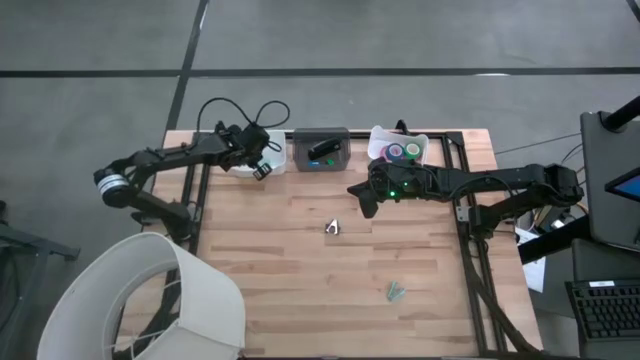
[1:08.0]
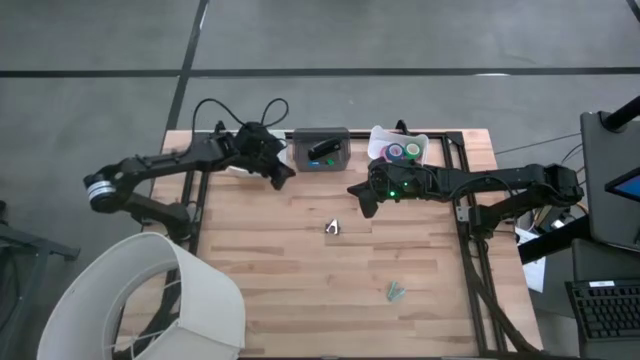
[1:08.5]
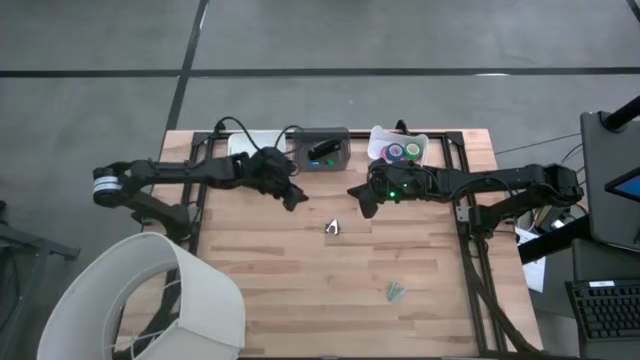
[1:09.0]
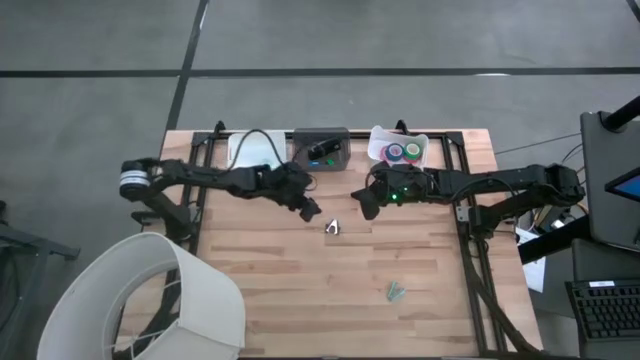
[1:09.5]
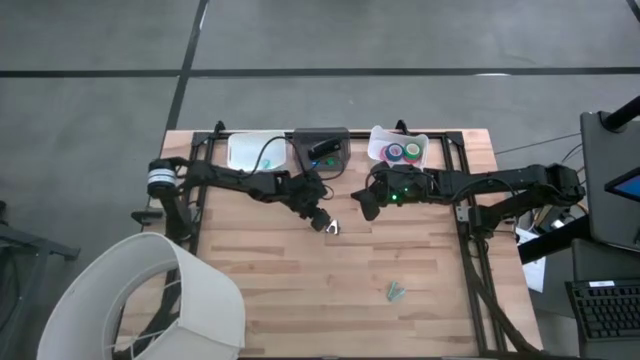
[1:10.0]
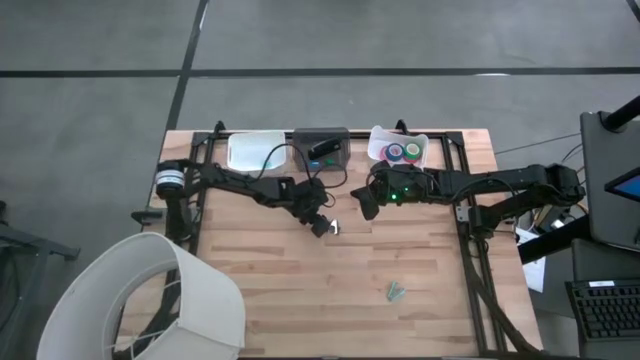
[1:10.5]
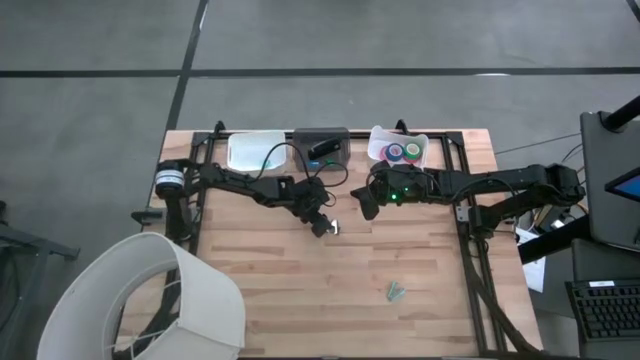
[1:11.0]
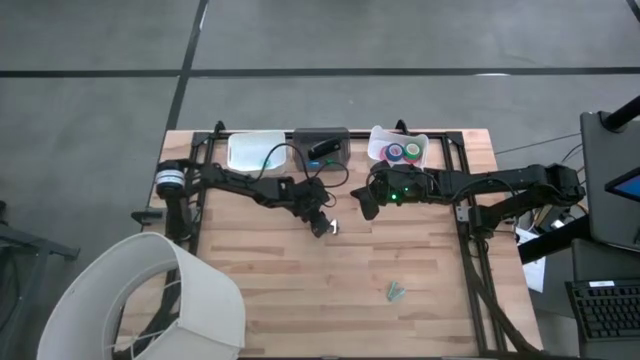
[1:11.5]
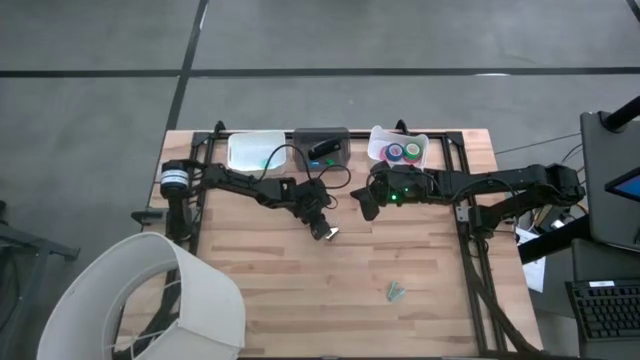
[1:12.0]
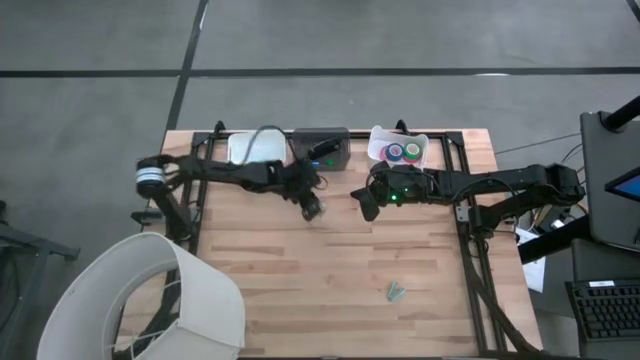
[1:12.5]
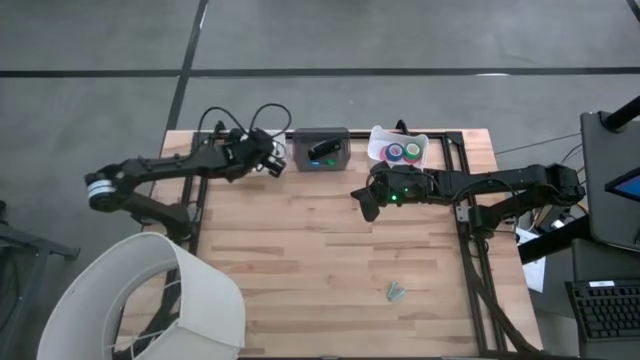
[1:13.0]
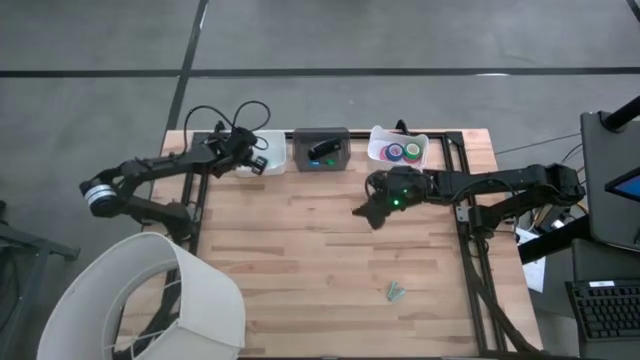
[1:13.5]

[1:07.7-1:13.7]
Task: Pick and place Stapler, Stapler remover, tape
Put the gray staple remover into the left white bin

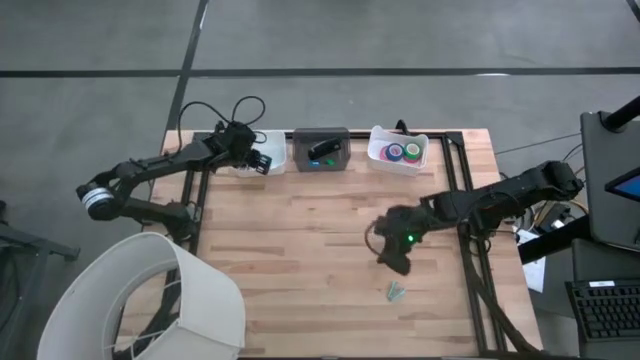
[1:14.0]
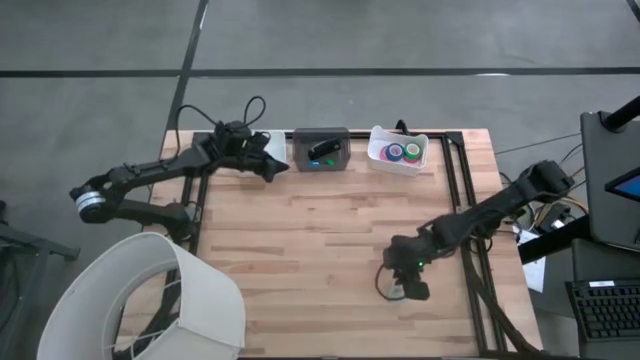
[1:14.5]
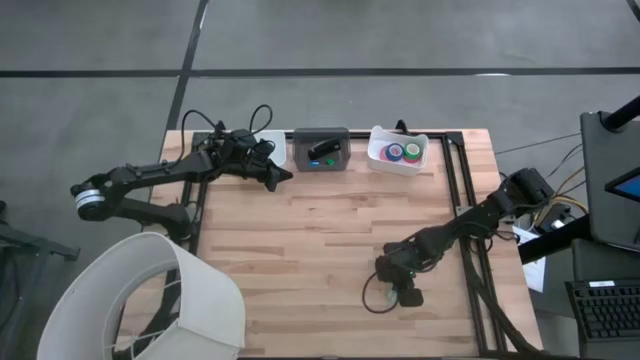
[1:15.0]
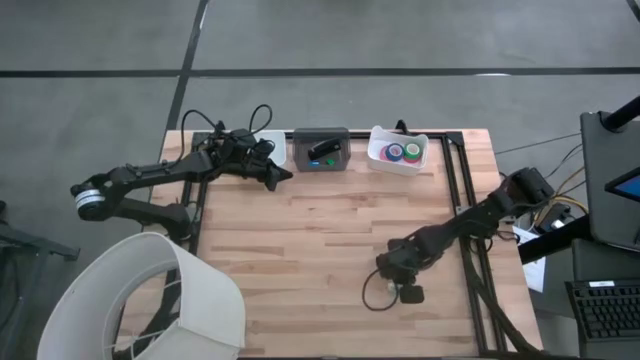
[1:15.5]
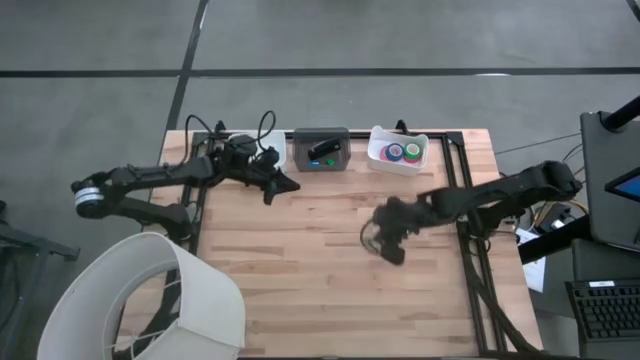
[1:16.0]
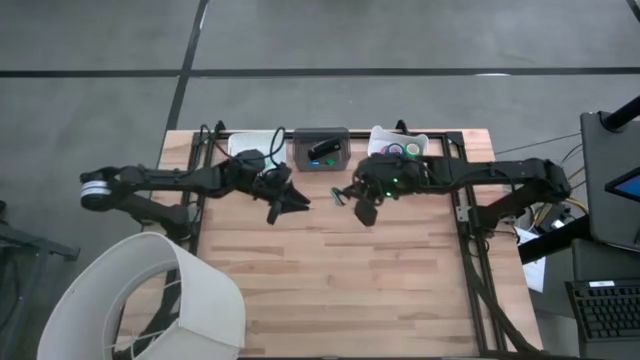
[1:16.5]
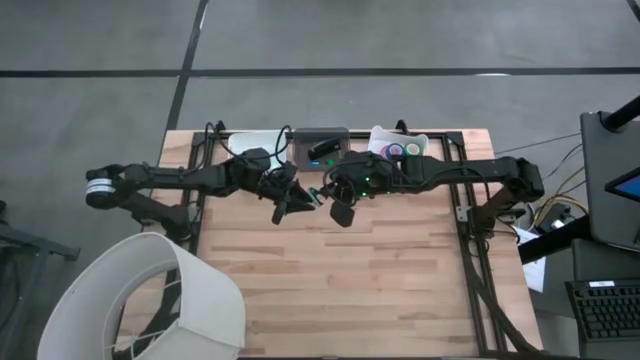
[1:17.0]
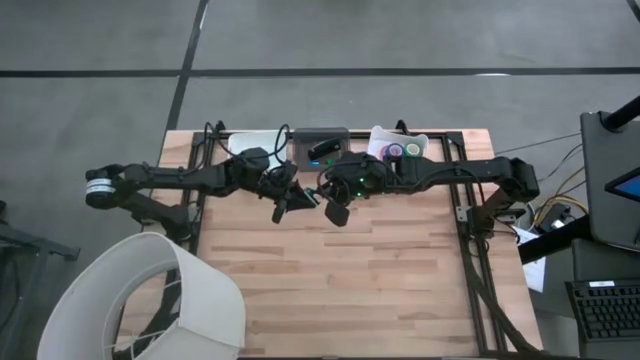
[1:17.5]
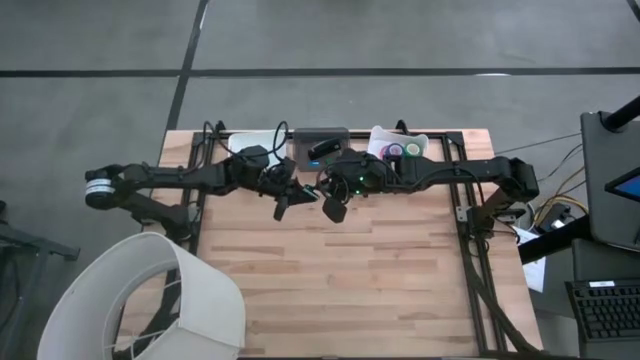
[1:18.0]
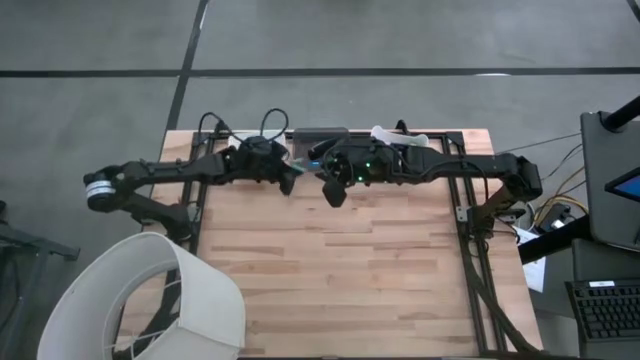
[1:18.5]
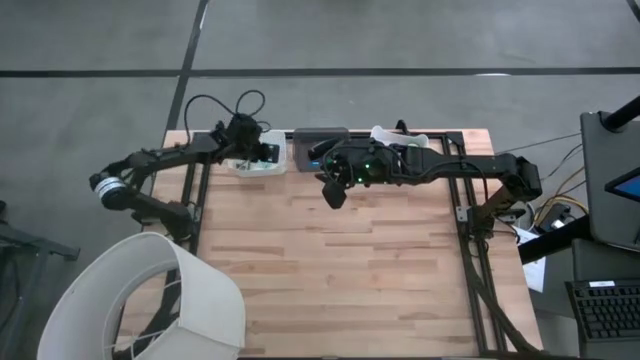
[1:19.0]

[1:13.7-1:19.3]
Put the light blue staple remover into the left white bin

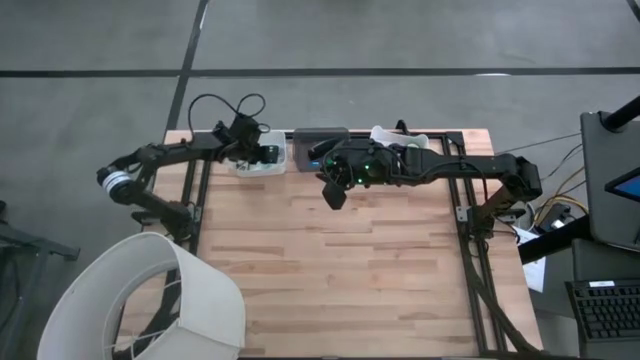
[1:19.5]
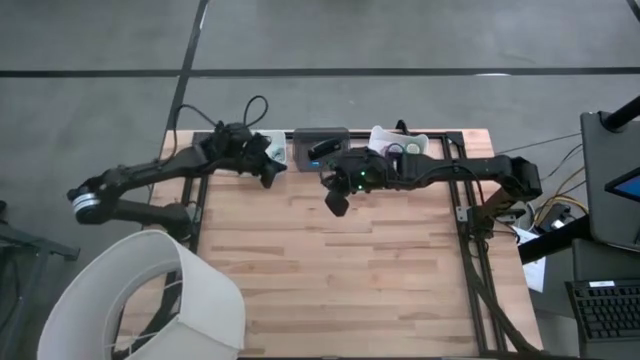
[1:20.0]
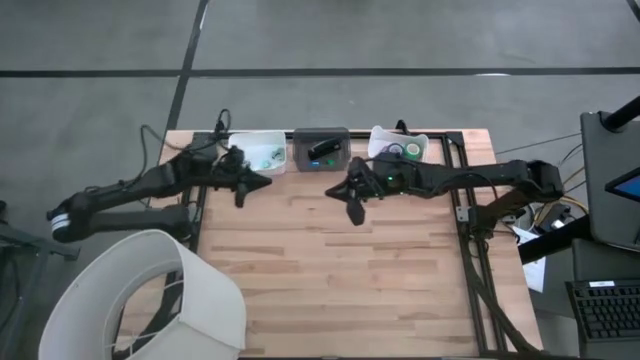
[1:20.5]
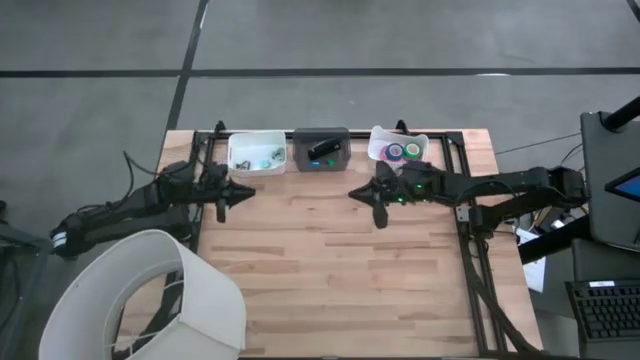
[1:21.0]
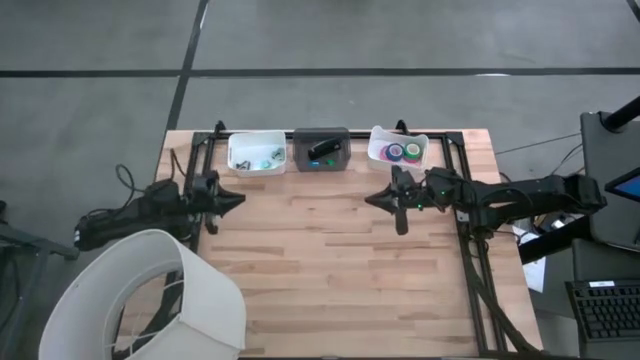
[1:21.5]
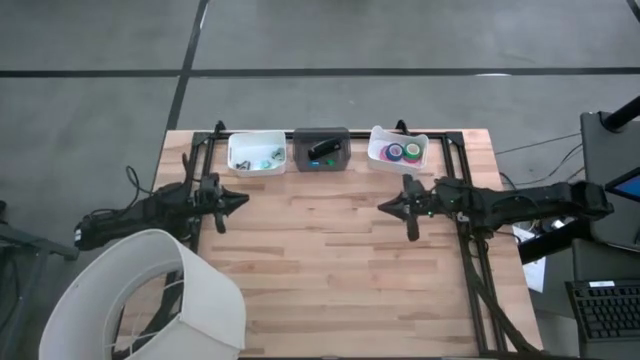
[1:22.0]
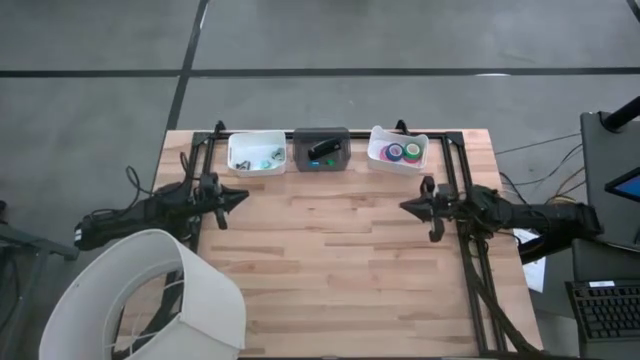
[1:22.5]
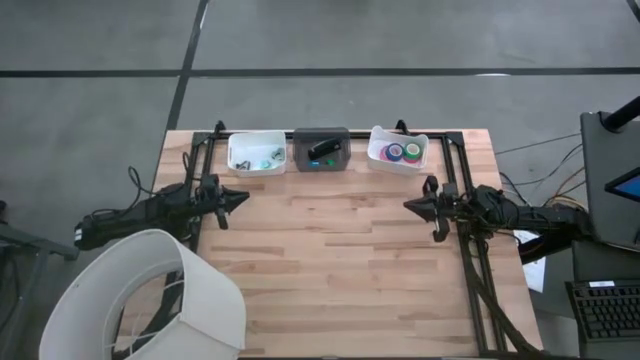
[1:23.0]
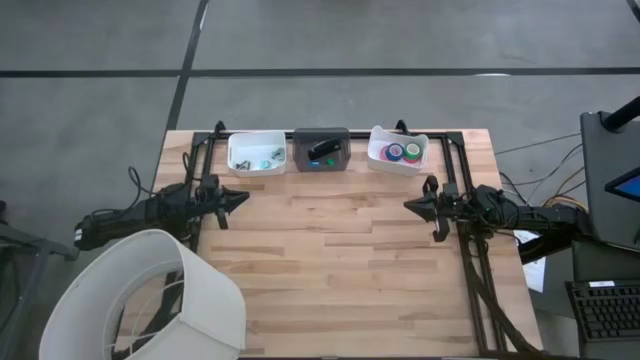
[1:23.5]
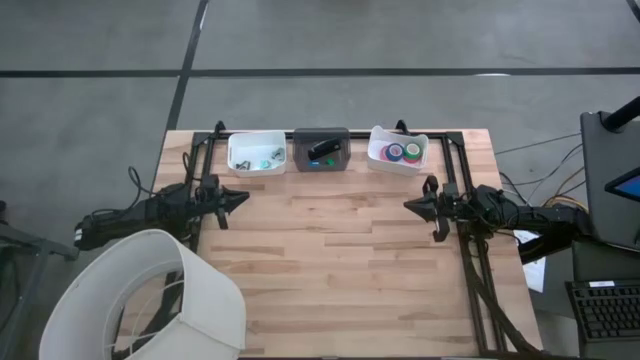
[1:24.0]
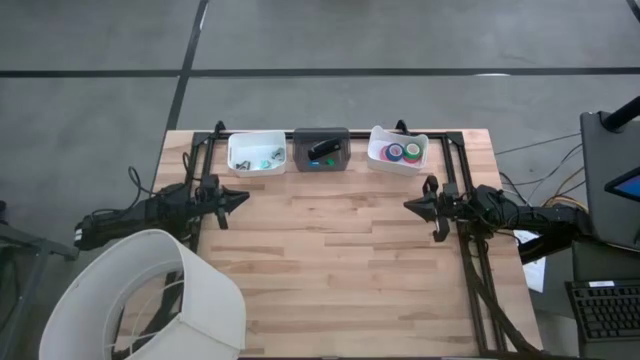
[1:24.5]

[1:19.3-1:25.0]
Return to Home Position

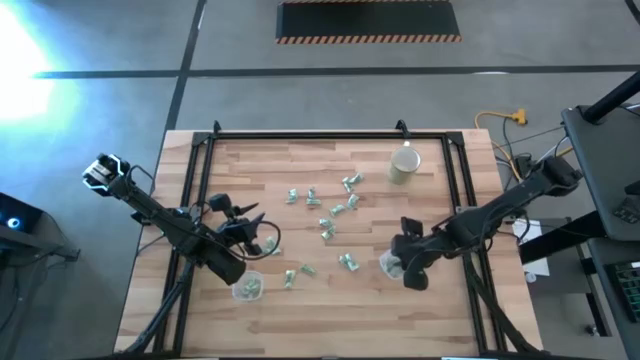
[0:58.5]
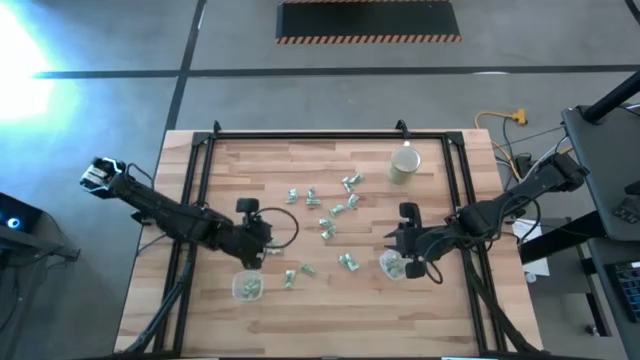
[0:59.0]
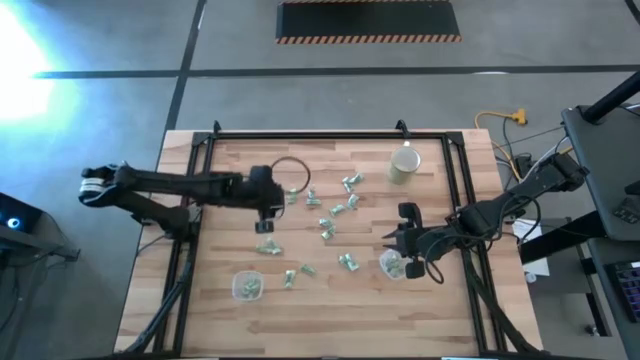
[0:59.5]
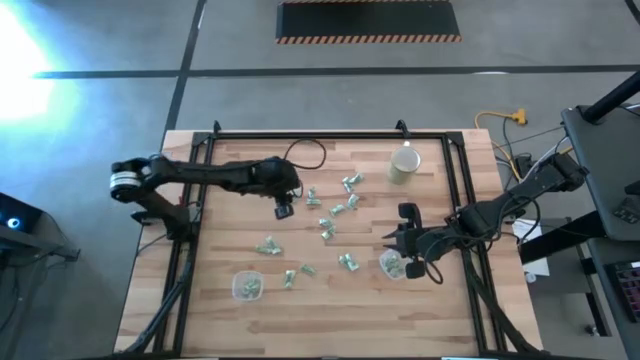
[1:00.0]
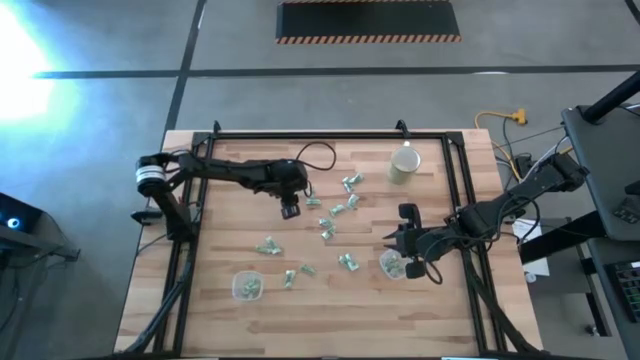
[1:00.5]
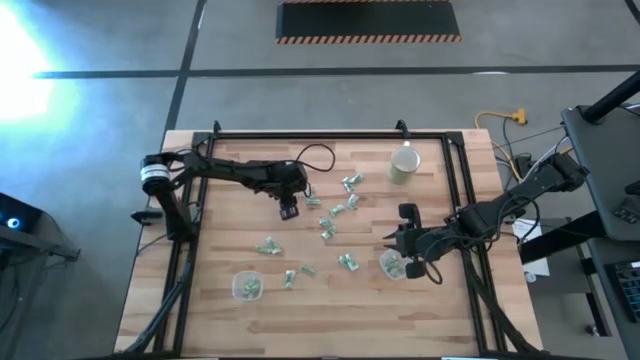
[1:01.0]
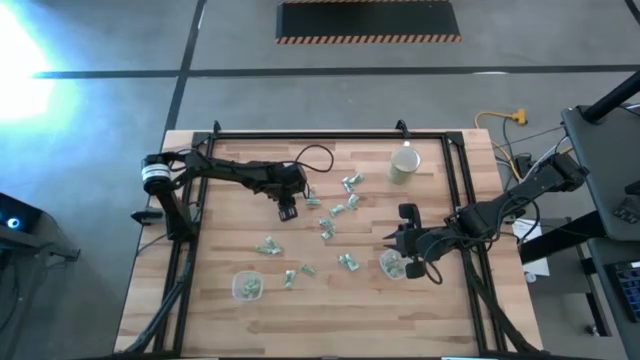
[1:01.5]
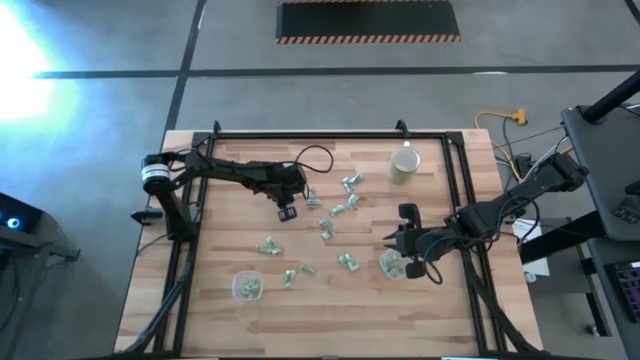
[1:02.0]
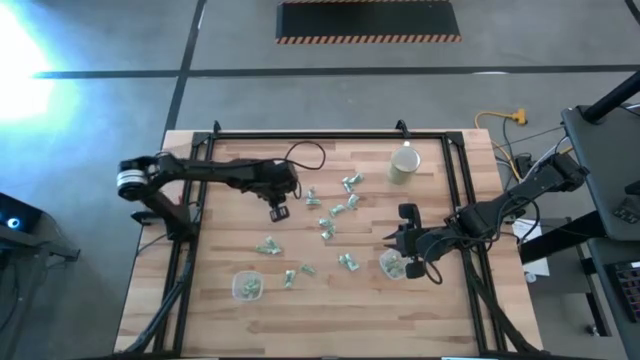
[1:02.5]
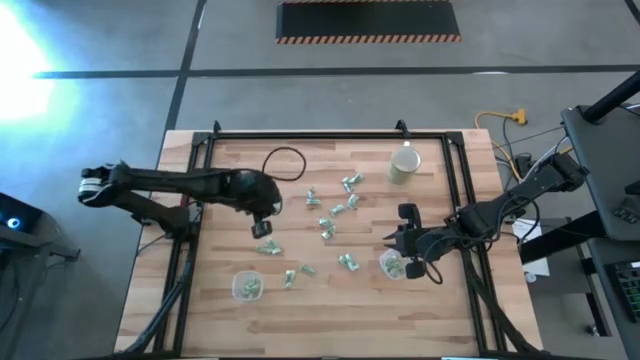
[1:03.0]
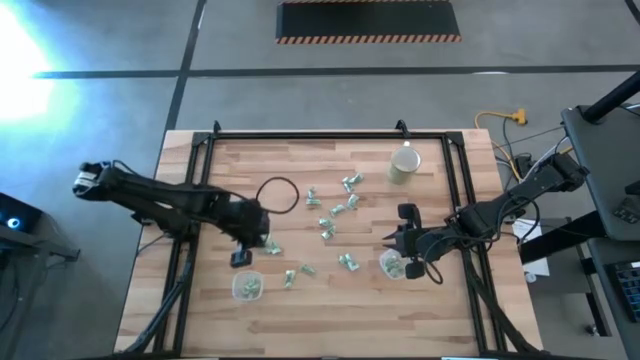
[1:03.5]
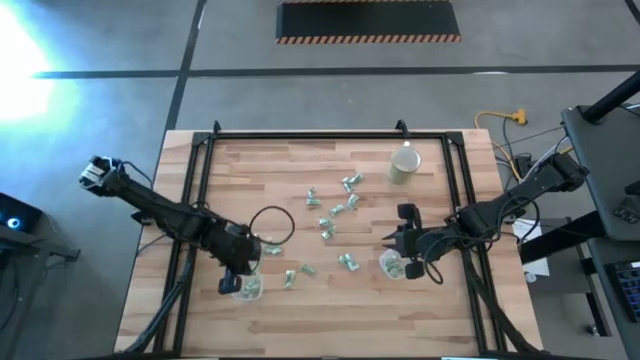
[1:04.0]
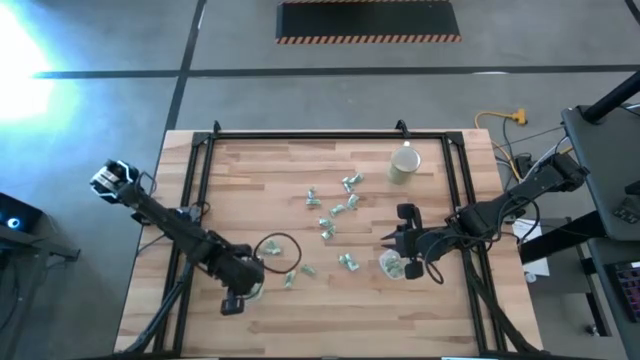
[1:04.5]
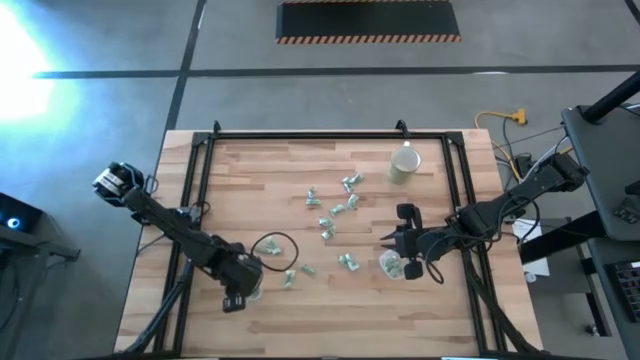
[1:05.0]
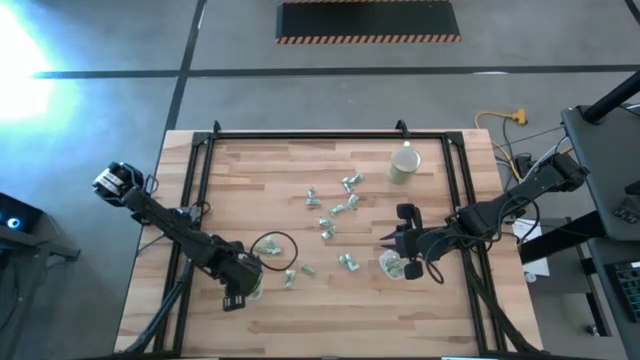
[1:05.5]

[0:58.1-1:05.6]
Task: Pick and place Stevia / Truvia into bins
Put the stevia packet into the left transparent container
